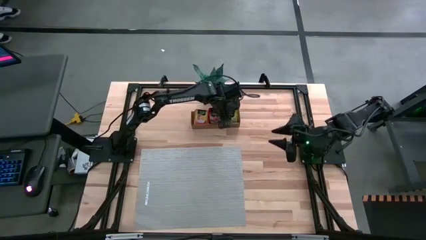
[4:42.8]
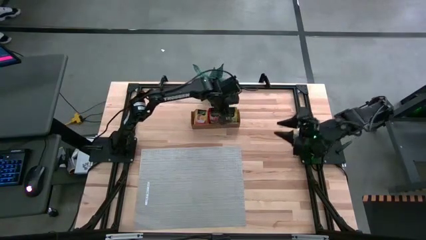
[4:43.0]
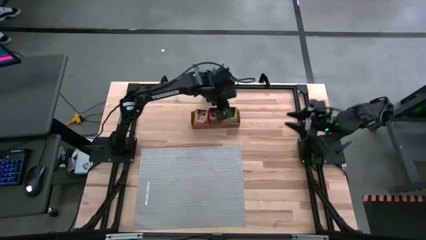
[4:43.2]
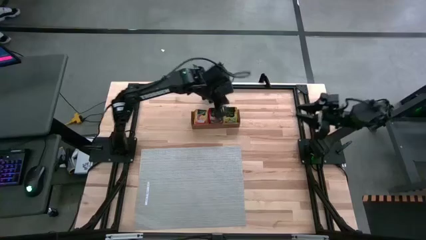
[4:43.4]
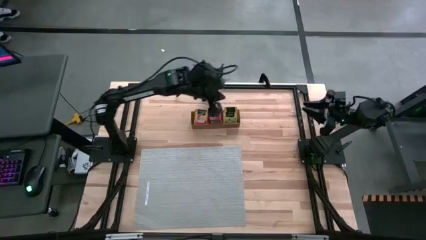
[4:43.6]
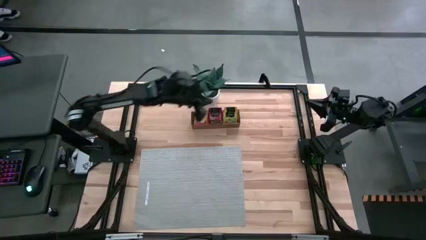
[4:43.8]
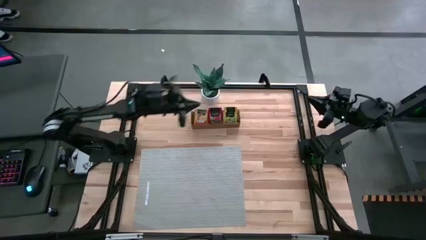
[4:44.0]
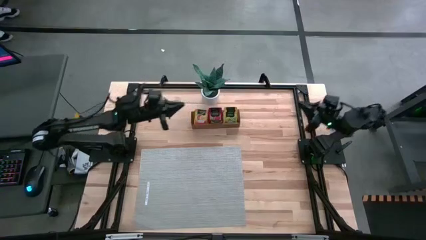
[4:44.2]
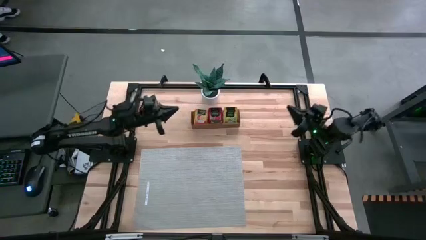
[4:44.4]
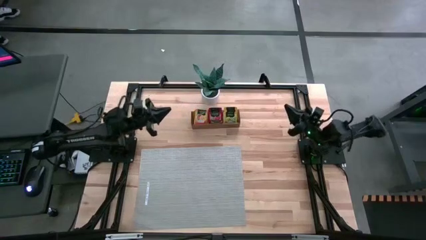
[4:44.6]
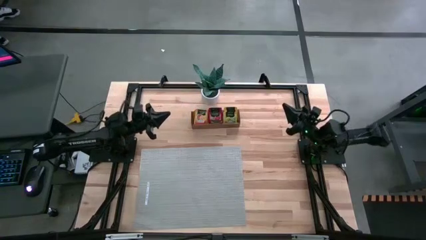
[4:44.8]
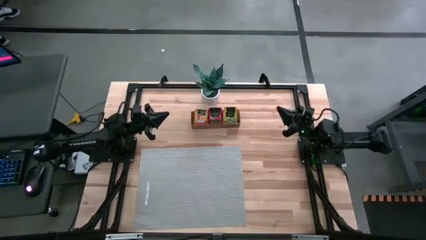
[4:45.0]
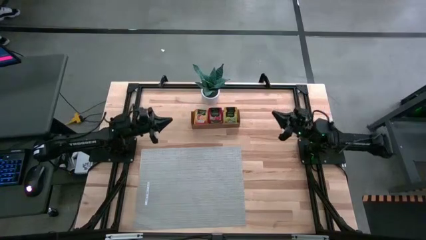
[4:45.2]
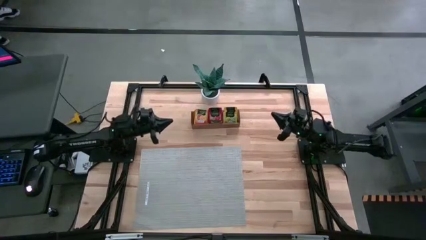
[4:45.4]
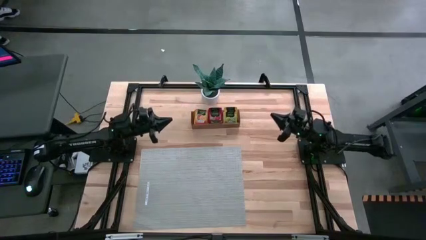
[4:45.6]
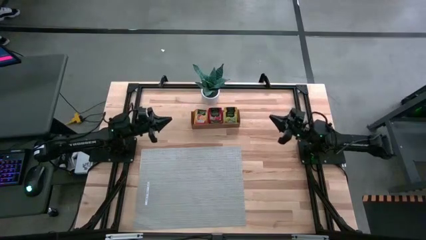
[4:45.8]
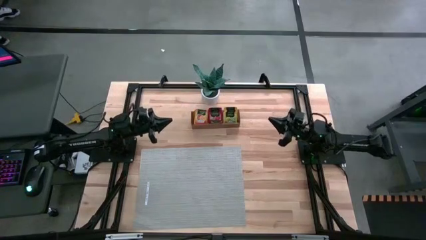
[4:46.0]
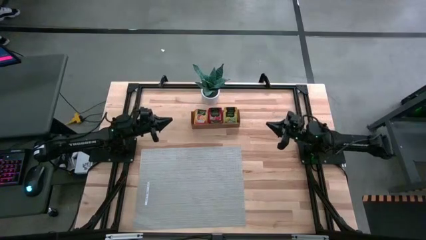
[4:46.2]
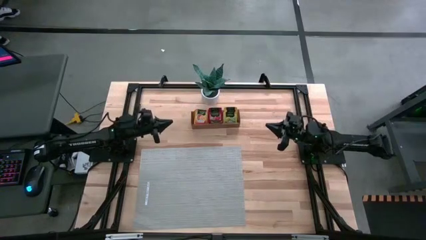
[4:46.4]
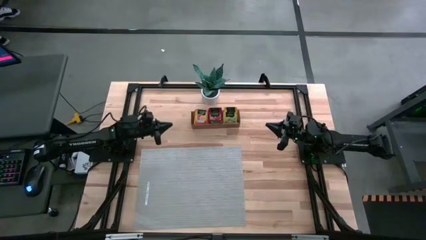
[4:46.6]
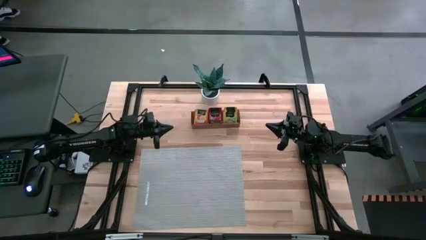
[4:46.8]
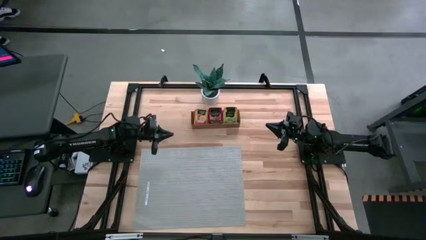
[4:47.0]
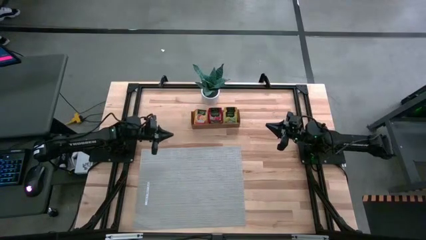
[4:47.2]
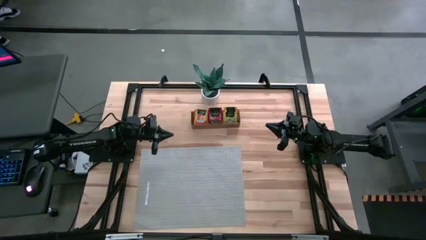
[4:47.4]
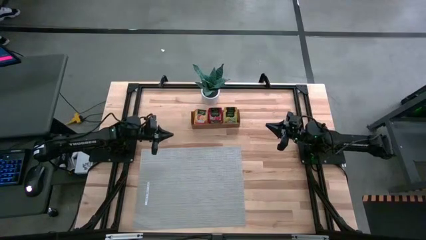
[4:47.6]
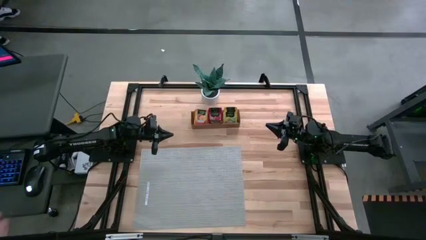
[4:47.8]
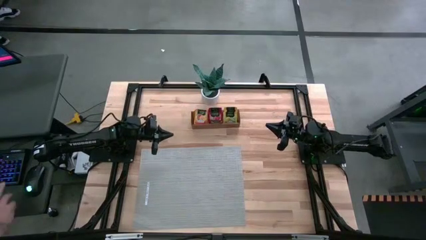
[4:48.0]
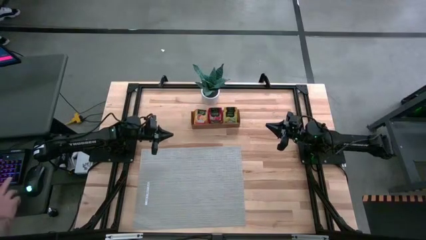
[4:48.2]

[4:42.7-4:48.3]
Task: Pick & Place Tea
Return to Home Position

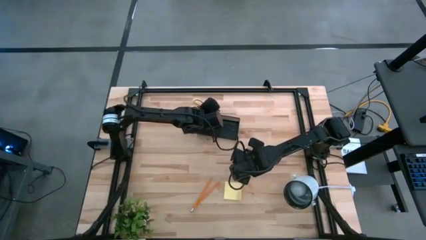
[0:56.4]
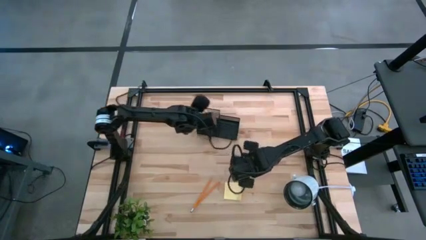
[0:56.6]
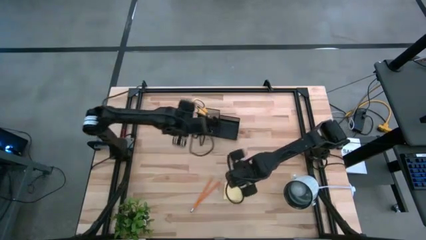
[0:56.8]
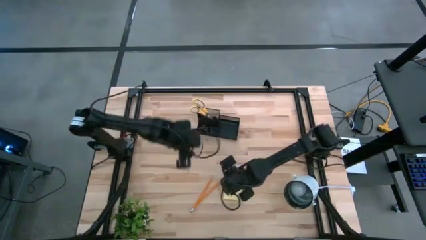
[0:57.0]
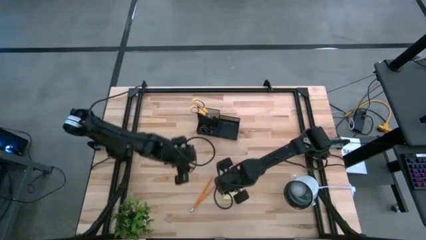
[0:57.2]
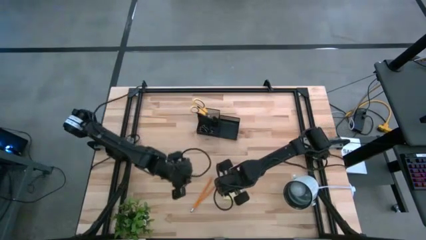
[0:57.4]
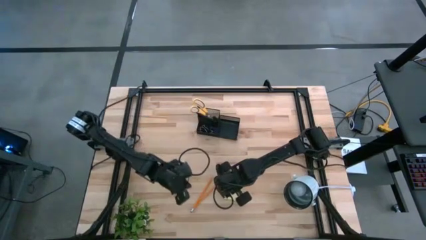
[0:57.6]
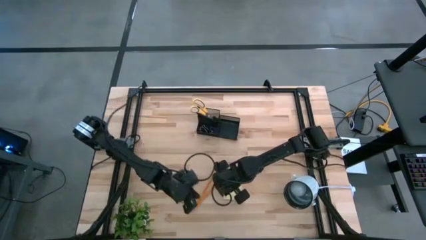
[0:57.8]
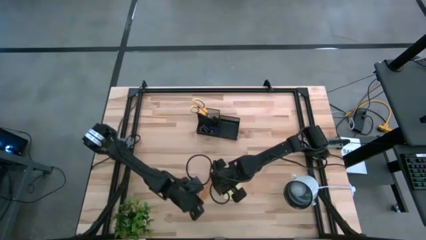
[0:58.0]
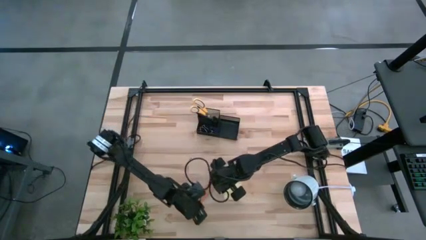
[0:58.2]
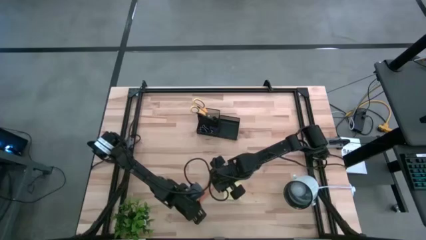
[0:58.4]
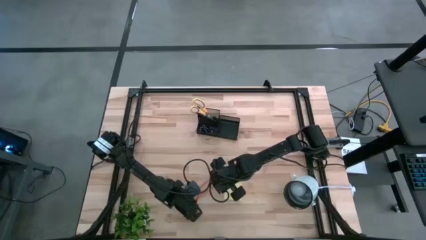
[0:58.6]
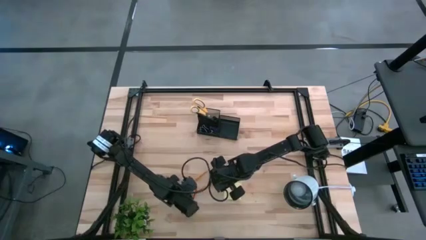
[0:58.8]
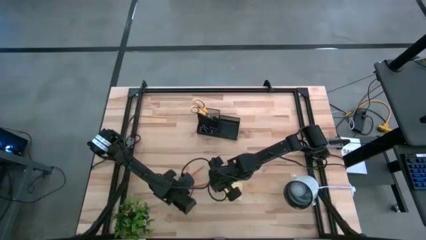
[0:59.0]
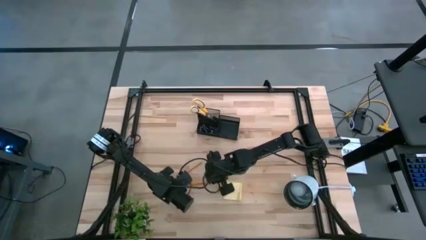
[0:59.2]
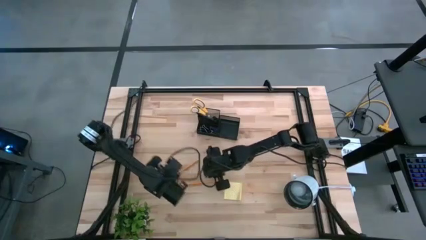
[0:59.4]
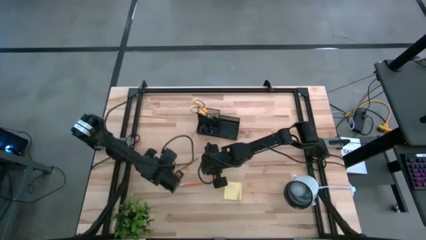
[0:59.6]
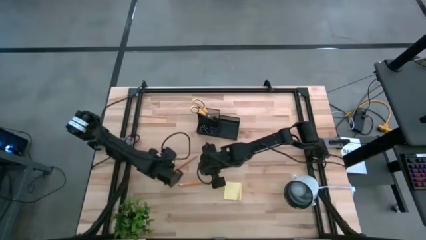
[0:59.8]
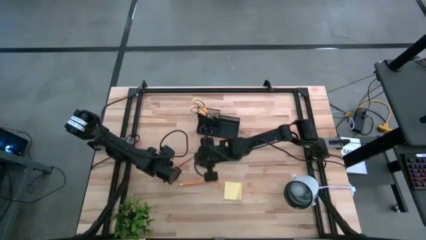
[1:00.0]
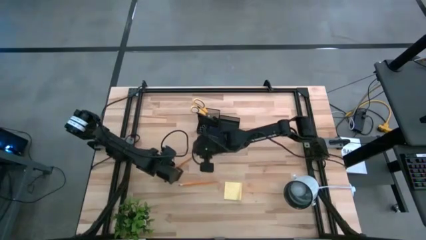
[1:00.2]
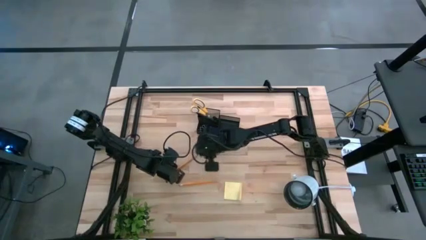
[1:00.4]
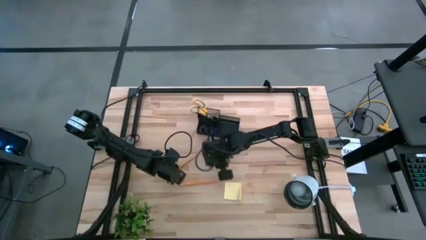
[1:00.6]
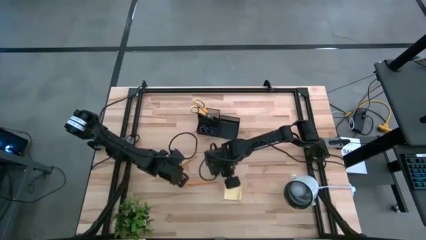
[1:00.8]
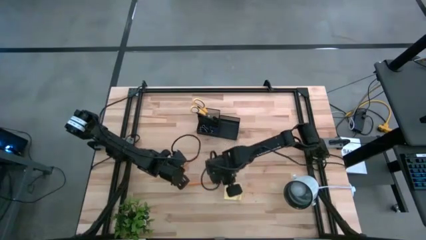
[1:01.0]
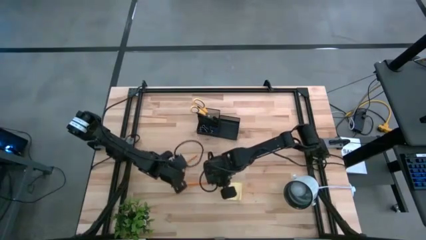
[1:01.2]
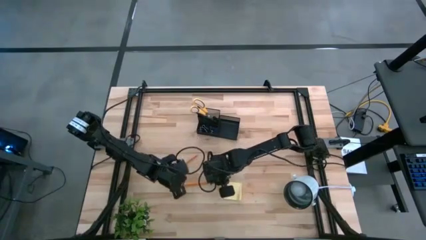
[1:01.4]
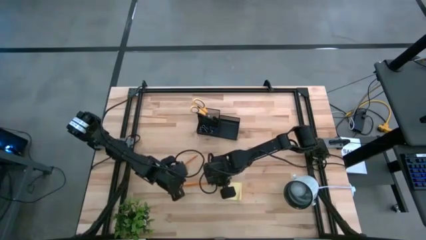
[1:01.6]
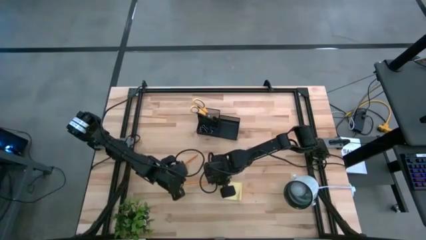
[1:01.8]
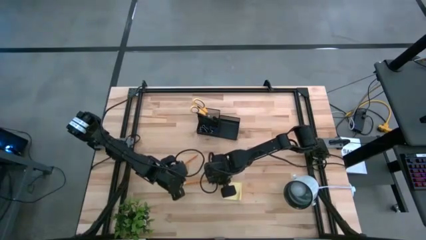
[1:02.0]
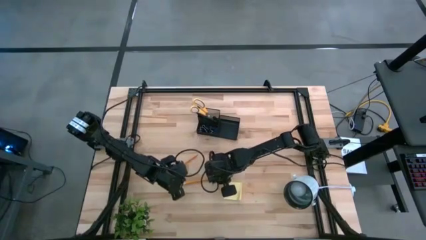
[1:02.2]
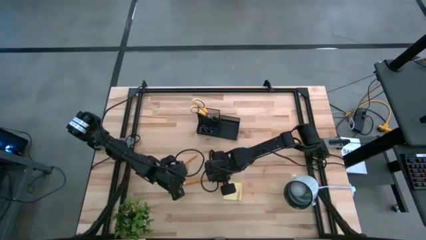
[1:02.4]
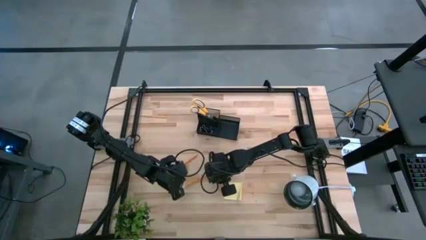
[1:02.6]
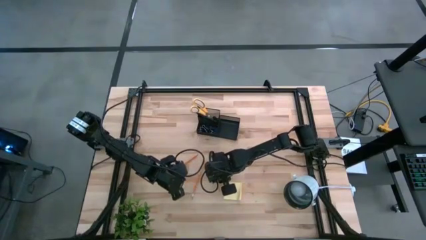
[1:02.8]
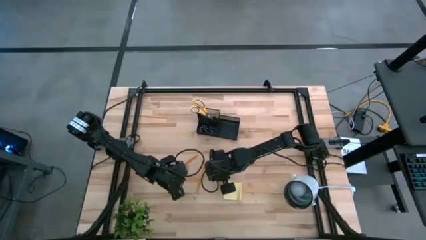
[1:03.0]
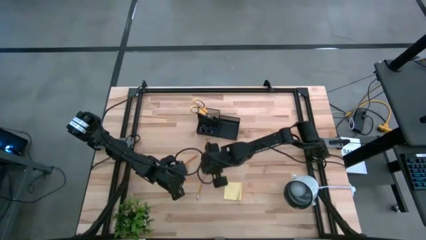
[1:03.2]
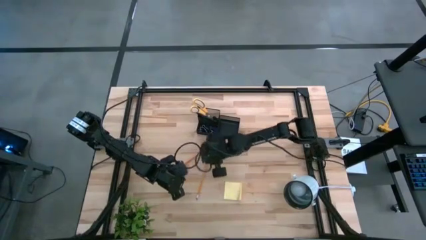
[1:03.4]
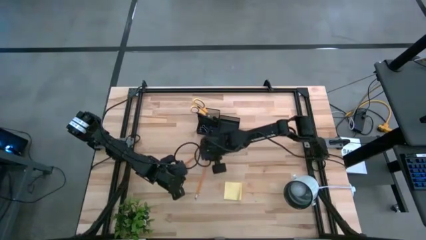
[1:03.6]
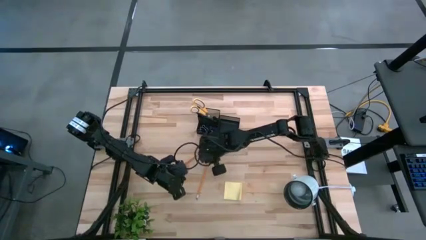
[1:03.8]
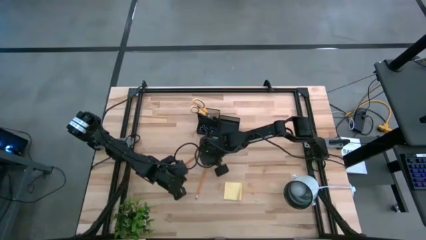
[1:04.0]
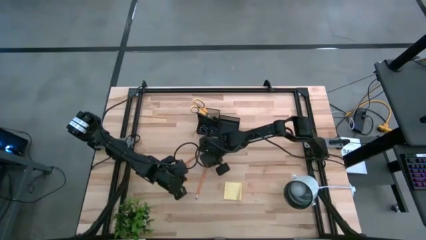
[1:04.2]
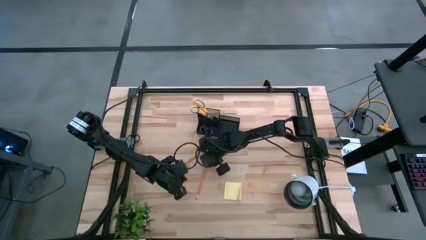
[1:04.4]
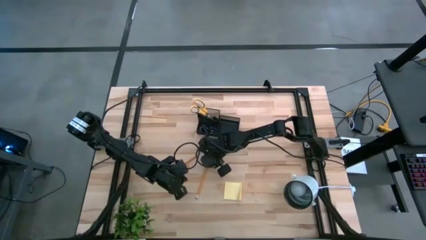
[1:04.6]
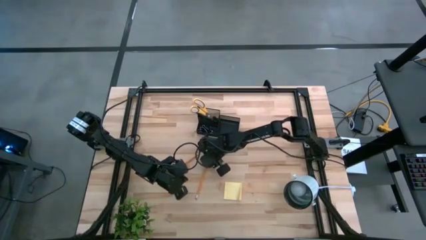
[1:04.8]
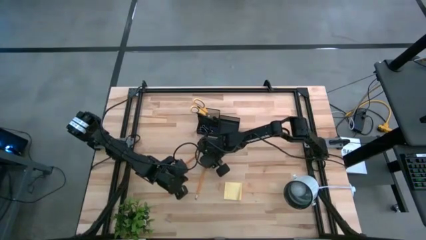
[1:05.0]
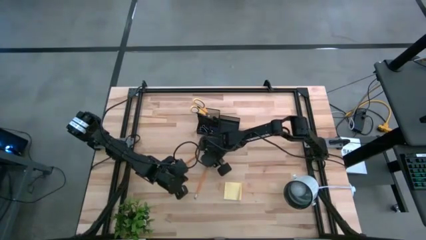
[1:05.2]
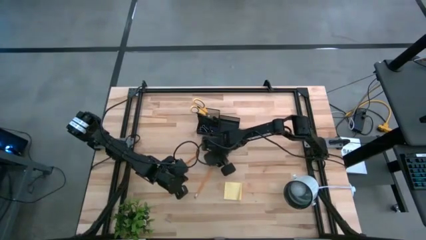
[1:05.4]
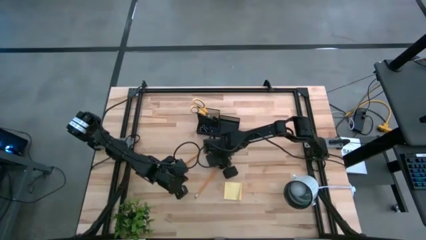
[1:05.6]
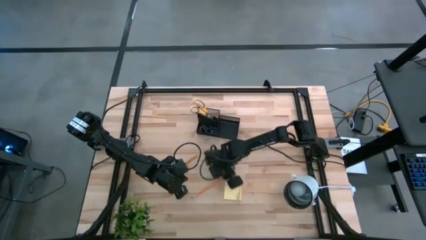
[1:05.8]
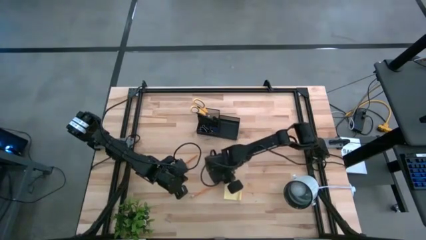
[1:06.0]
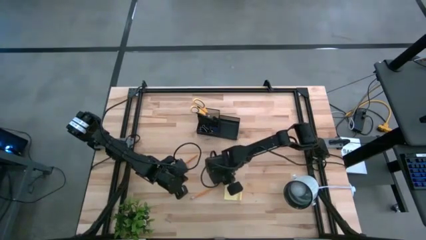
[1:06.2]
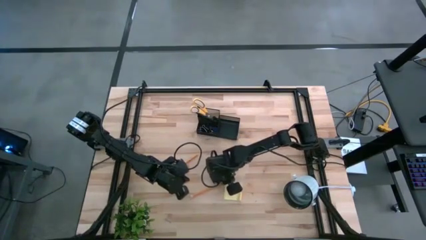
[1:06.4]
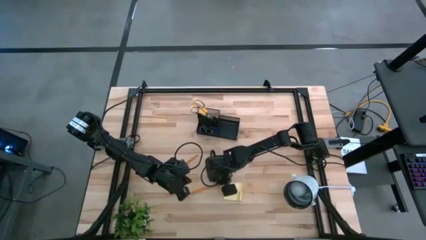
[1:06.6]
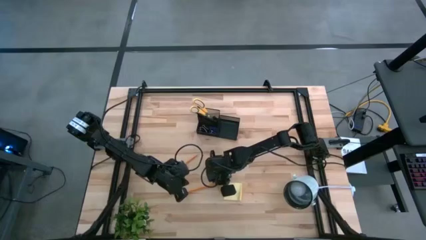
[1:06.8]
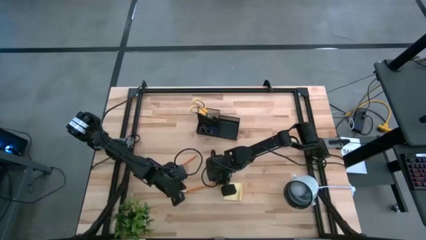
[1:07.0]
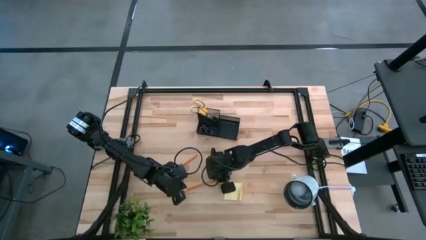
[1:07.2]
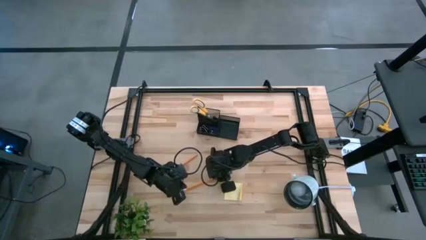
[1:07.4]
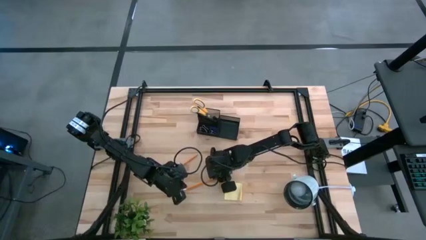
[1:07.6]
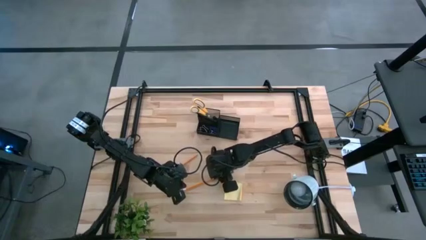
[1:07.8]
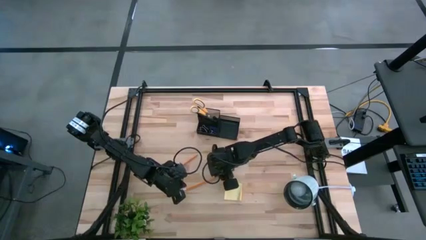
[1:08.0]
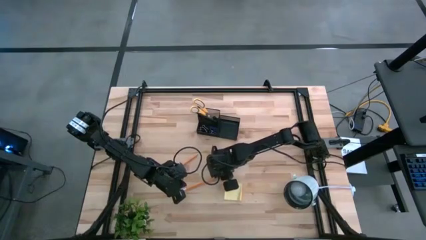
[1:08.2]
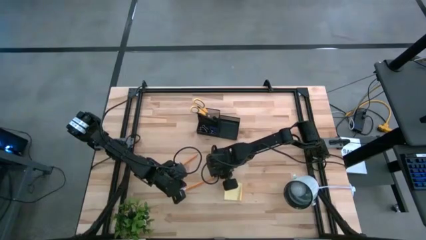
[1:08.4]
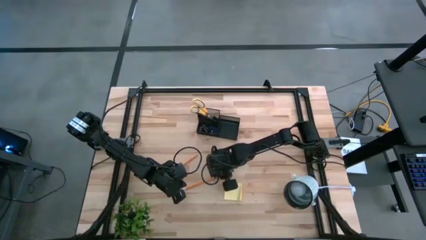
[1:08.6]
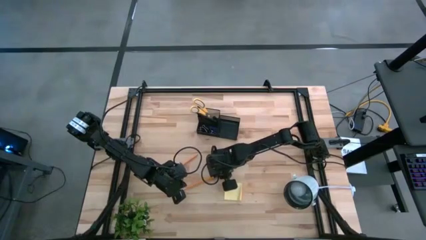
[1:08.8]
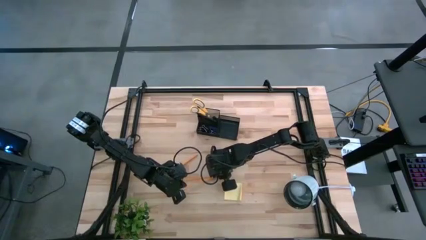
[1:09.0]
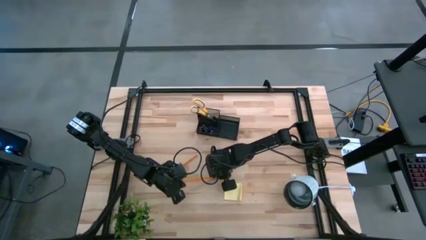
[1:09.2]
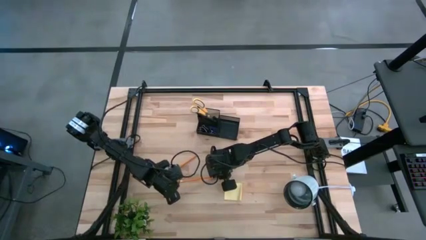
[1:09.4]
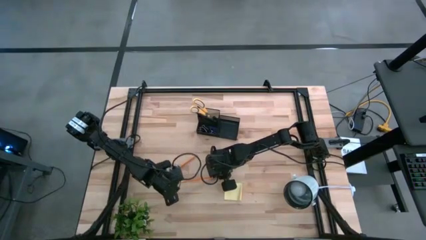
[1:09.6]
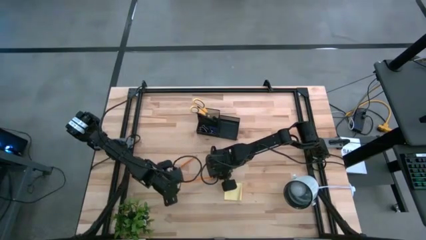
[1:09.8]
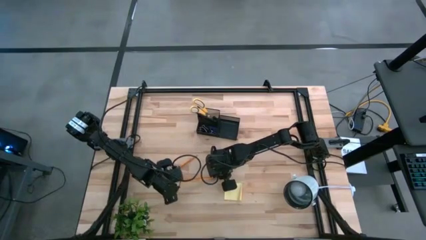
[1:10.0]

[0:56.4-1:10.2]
Task: Pick and place office supplies into organizer
Put the bottom orange pencil into the black organizer bin
